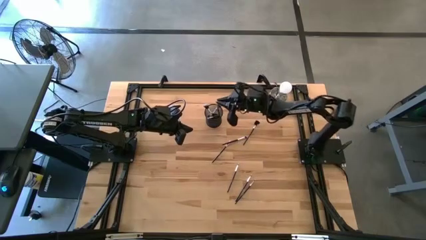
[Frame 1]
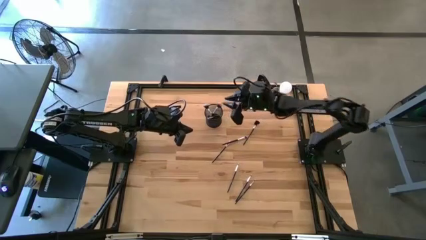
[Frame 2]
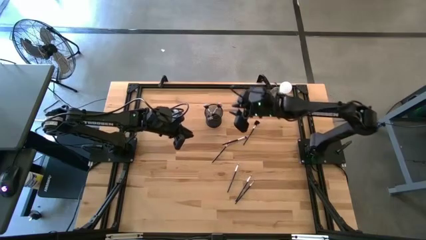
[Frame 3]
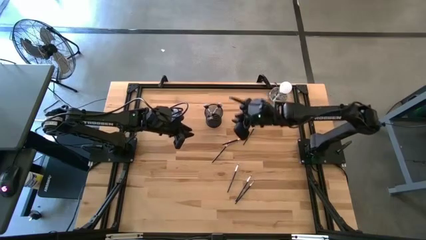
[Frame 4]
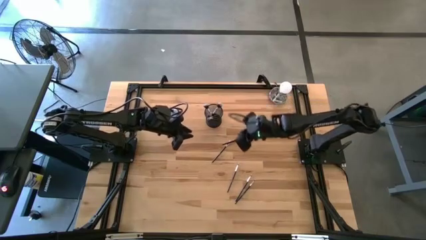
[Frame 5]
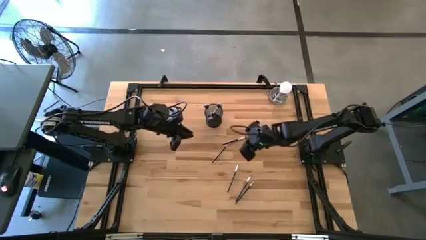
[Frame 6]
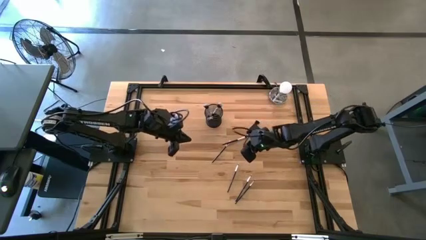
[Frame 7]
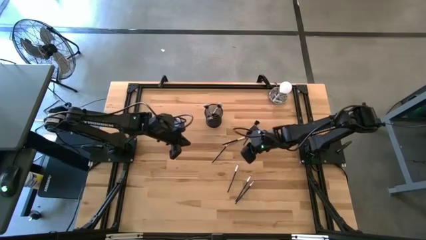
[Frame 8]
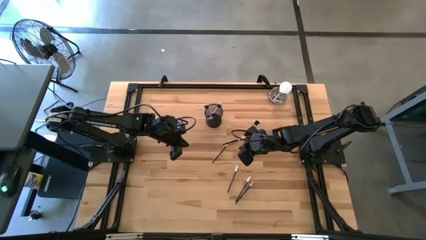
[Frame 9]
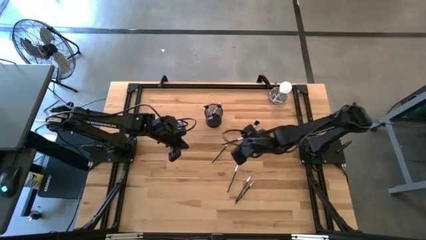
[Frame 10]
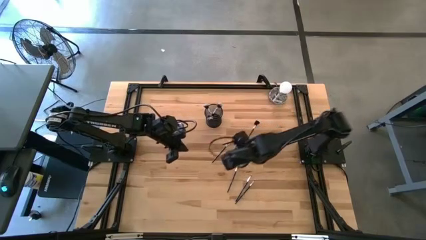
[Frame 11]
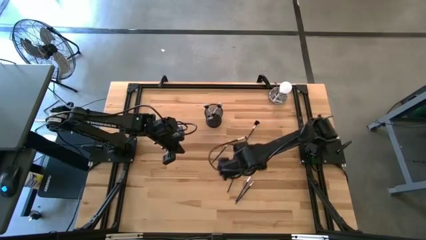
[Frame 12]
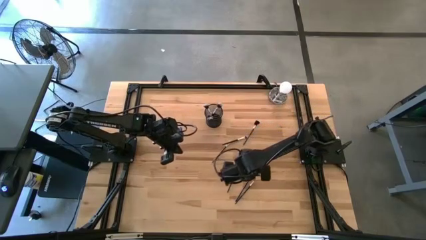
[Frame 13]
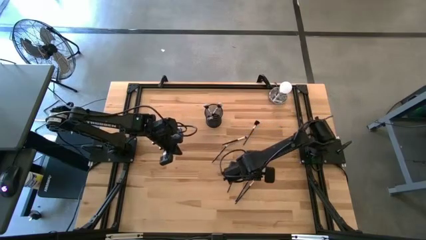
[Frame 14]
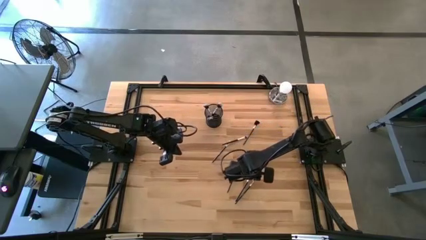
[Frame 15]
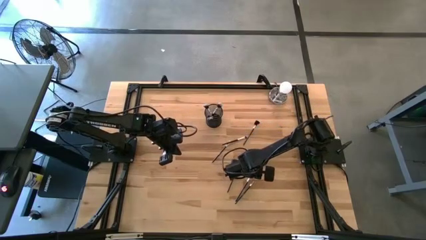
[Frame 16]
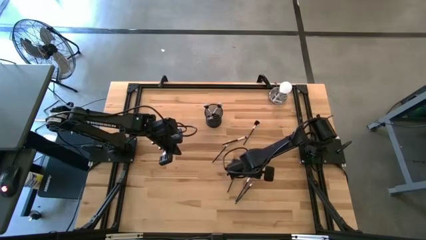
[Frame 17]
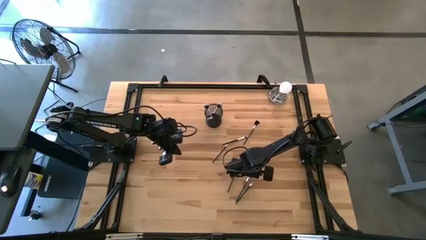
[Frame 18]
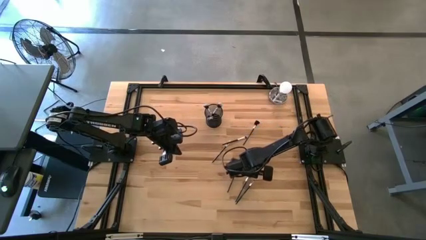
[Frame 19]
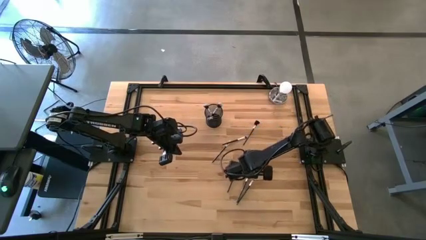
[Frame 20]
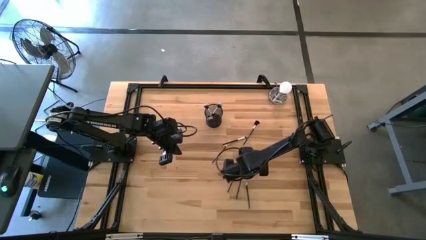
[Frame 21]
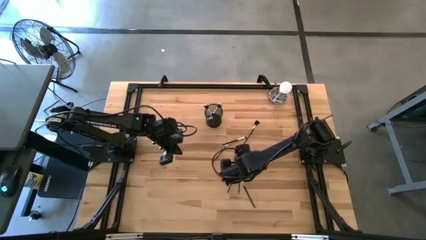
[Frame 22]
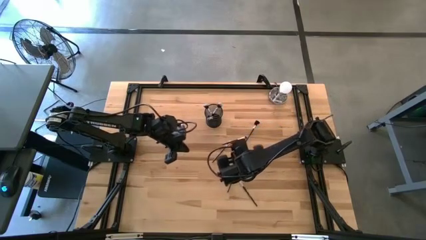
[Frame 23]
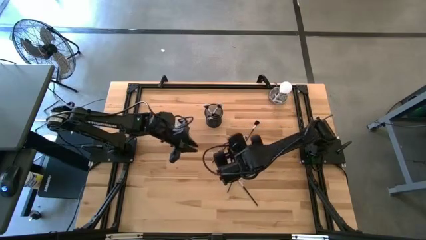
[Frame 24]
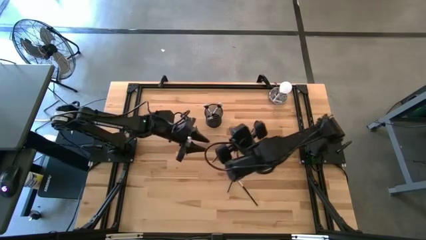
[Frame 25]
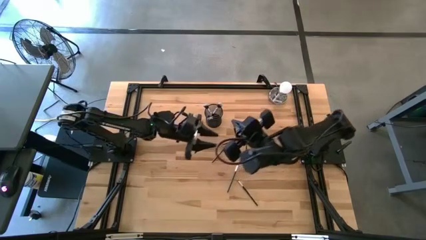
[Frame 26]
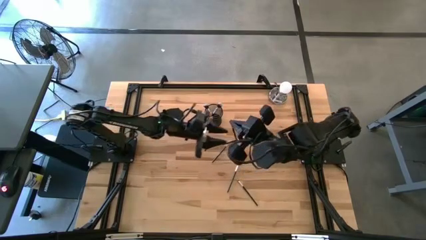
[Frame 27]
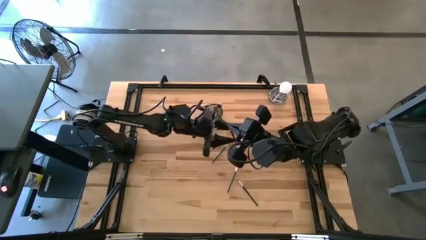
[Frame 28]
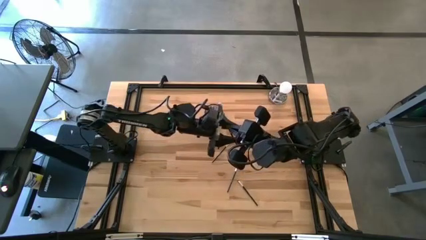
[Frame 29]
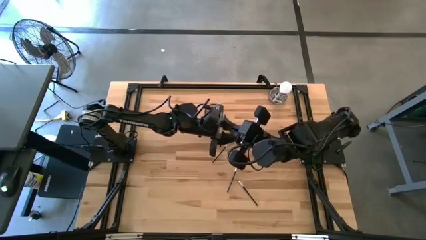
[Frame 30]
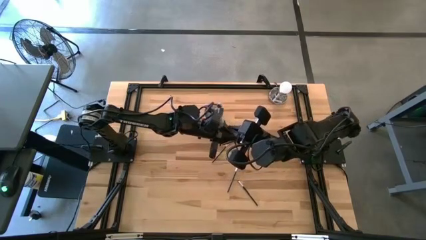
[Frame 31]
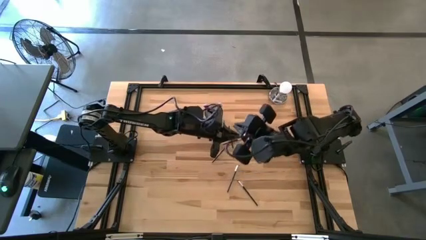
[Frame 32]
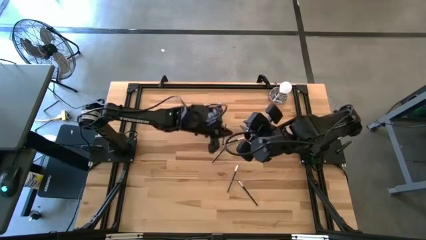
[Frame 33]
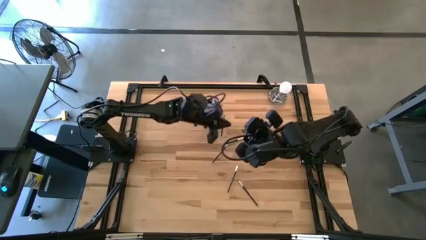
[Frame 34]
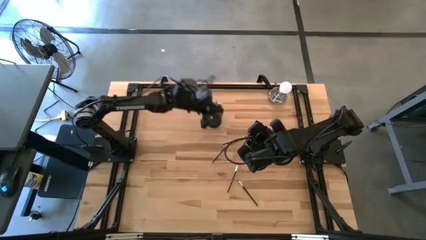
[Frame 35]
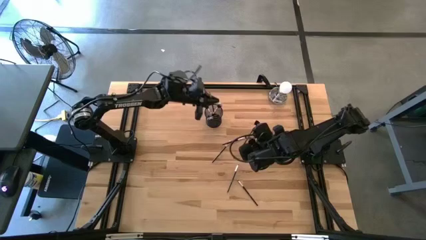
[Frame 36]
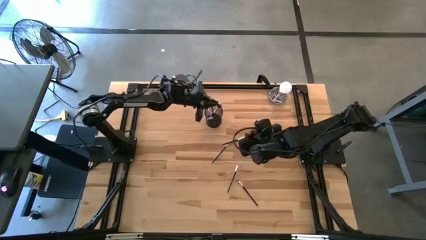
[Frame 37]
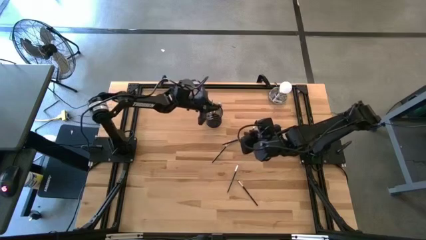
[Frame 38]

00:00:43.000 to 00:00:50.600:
Task: Pick & Place Makeup Brushes
Put the small white make-up brush into the black container

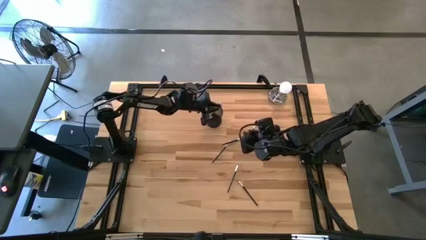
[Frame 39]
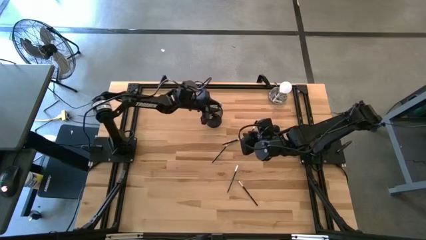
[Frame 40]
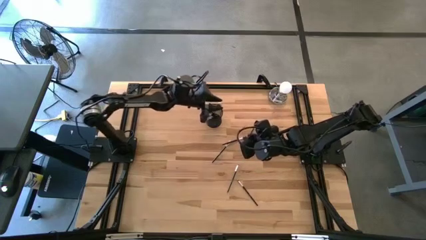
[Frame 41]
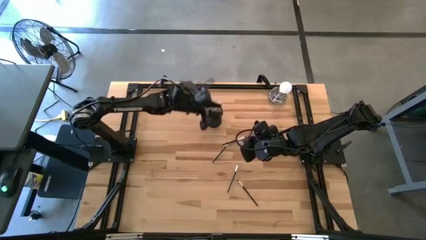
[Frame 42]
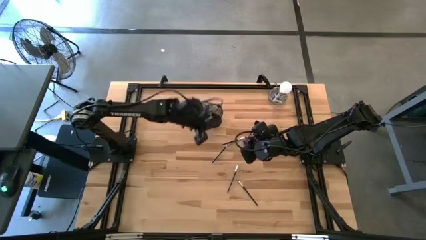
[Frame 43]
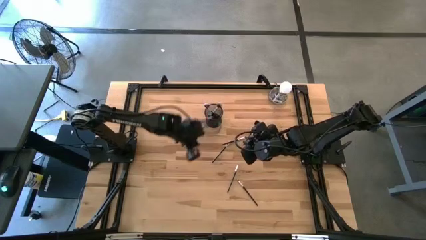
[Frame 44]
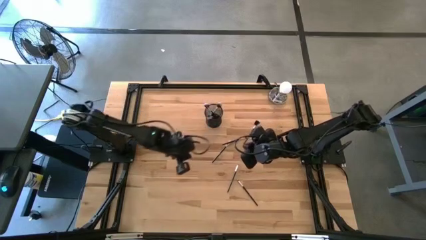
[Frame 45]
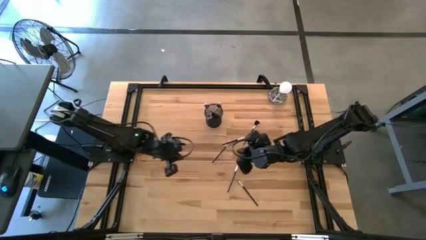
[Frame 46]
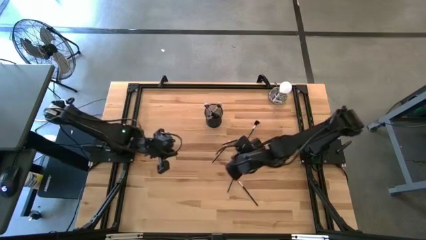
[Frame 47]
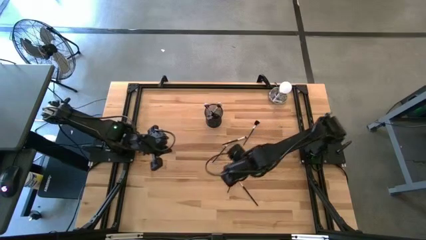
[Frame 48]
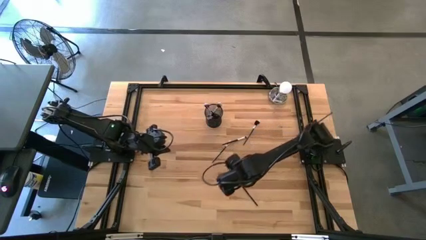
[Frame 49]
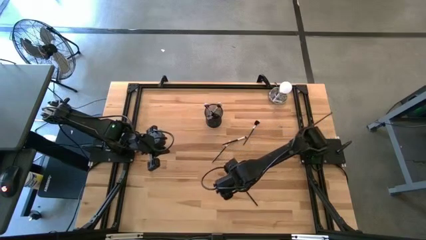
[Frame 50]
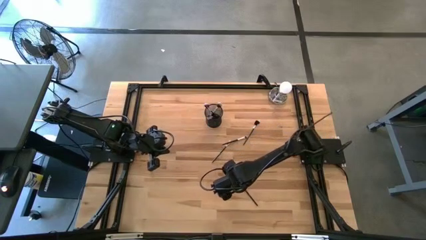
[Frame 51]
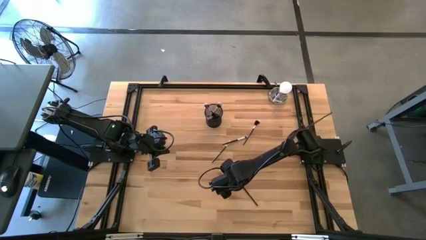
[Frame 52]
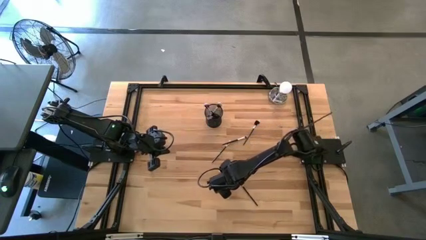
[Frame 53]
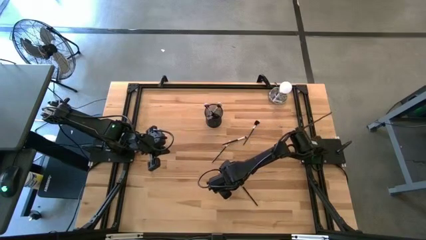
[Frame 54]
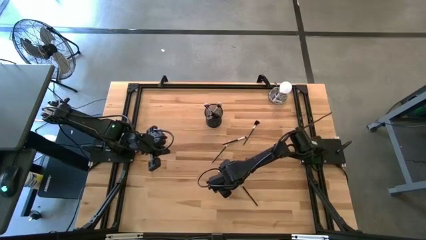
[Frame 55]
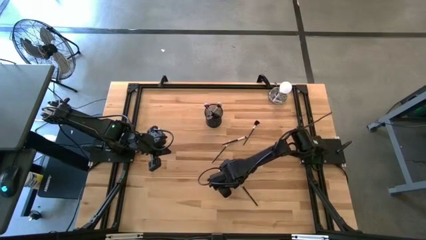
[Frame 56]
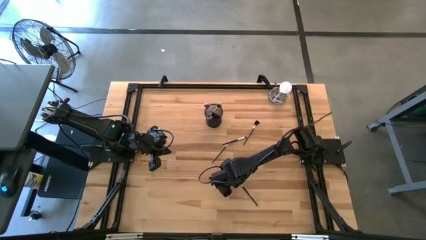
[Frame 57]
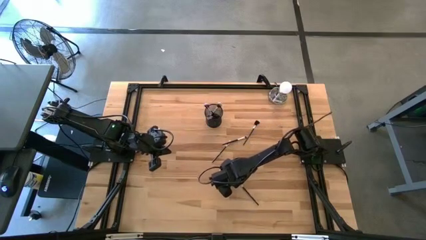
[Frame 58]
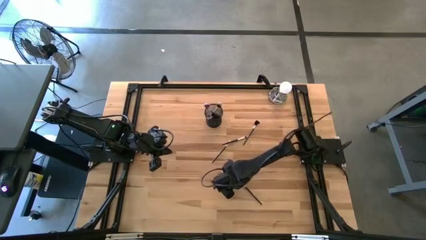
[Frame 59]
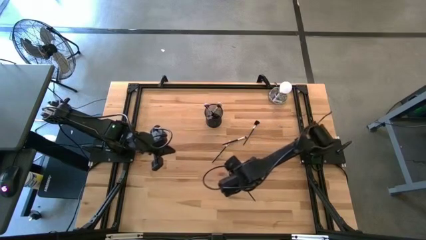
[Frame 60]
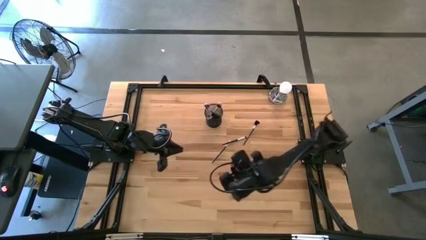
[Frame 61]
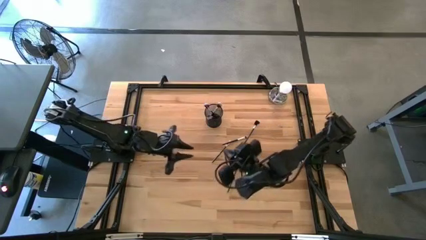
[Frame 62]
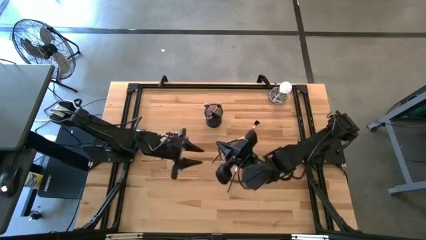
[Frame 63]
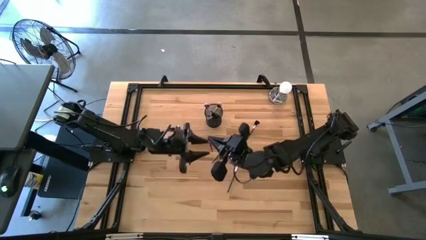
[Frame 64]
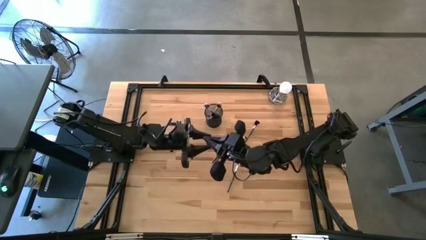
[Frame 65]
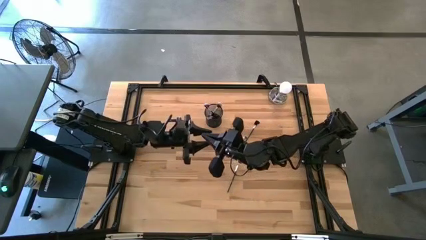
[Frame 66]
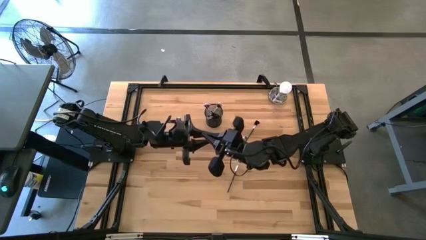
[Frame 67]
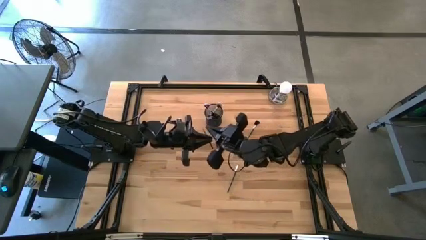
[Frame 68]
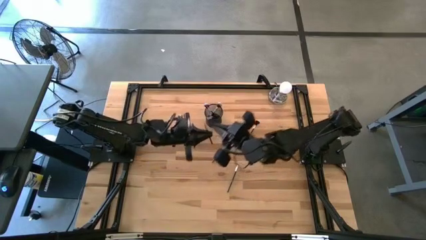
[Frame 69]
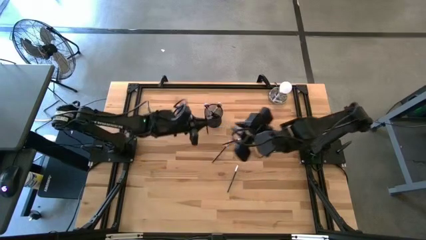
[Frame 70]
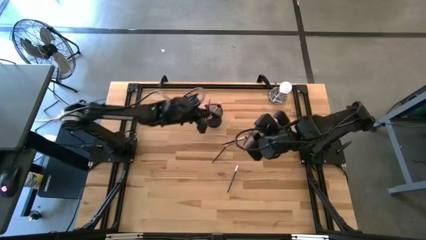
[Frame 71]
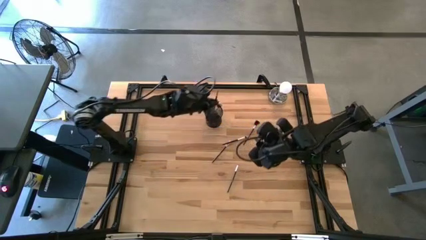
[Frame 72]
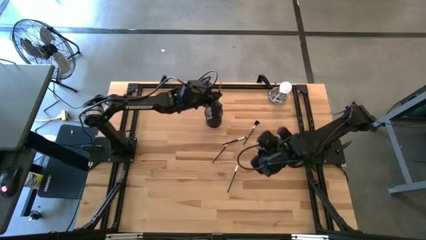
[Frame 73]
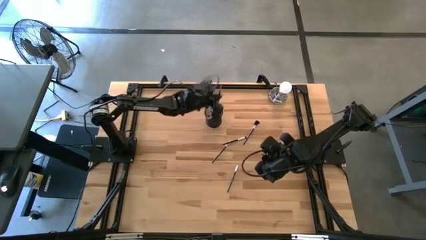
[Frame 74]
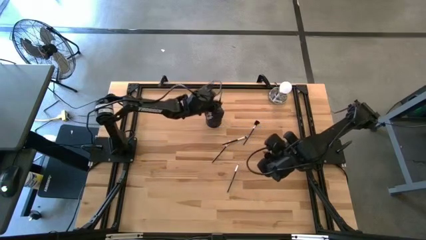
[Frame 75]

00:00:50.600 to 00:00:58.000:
Put the small white make-up brush into the black container
